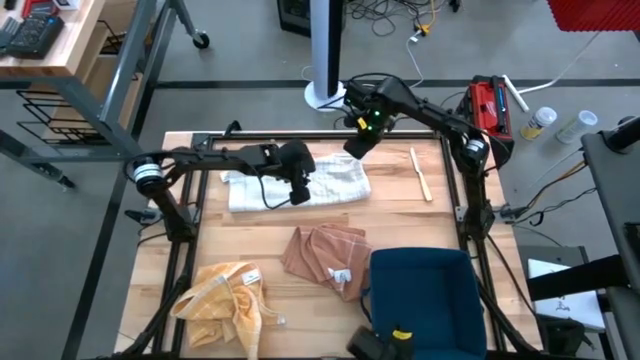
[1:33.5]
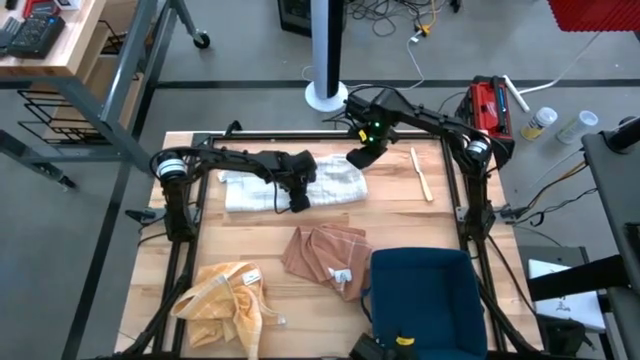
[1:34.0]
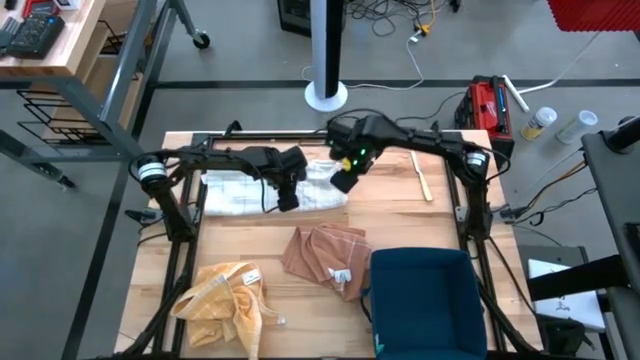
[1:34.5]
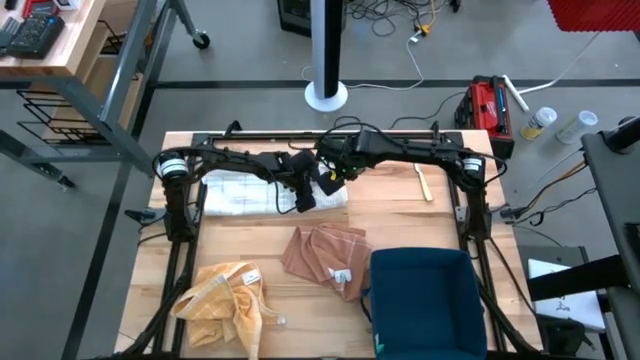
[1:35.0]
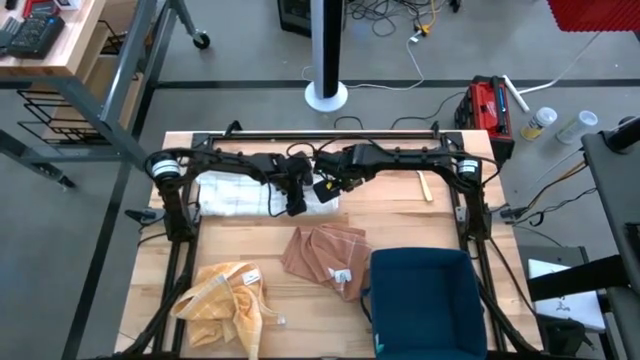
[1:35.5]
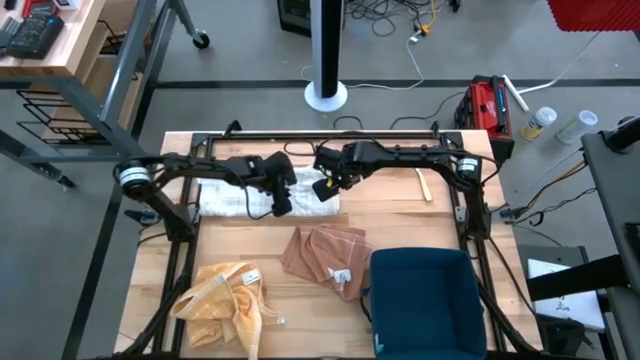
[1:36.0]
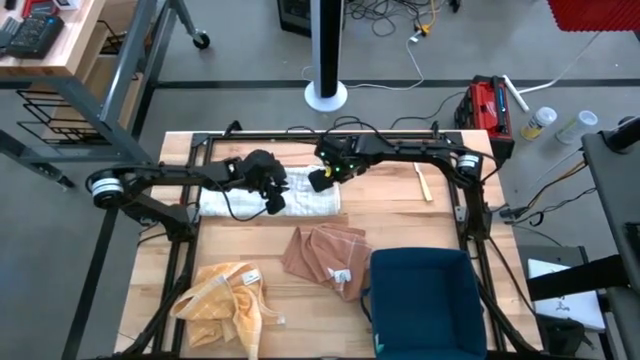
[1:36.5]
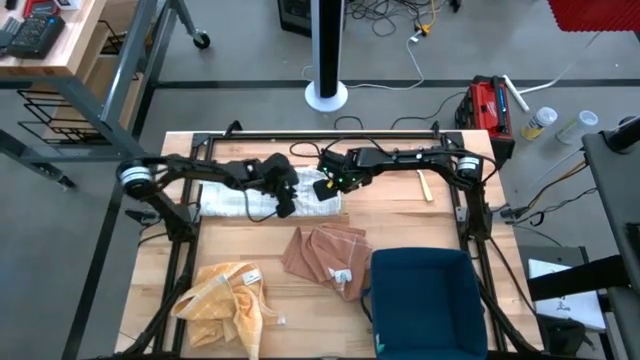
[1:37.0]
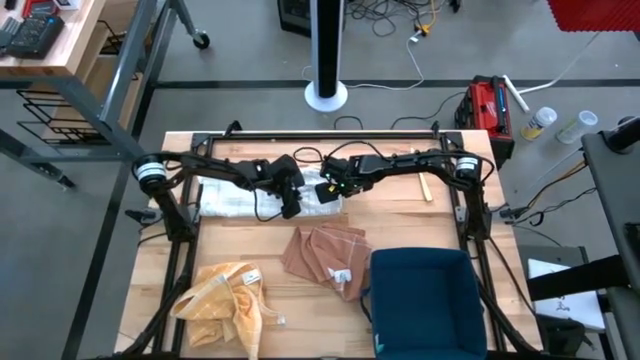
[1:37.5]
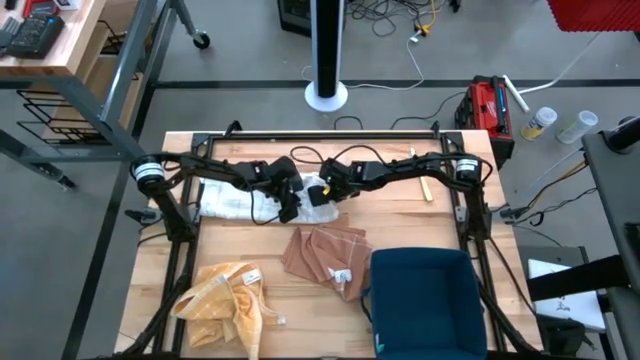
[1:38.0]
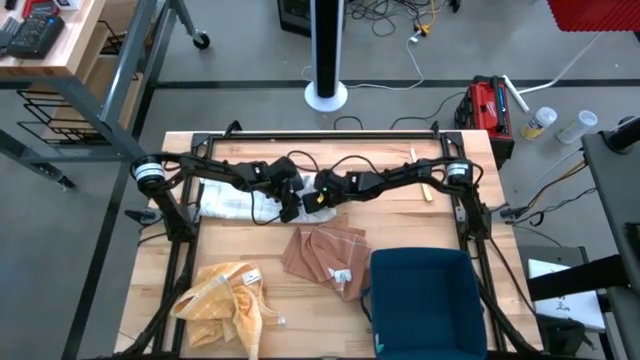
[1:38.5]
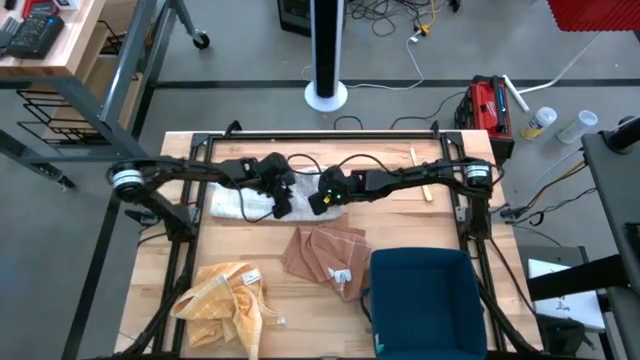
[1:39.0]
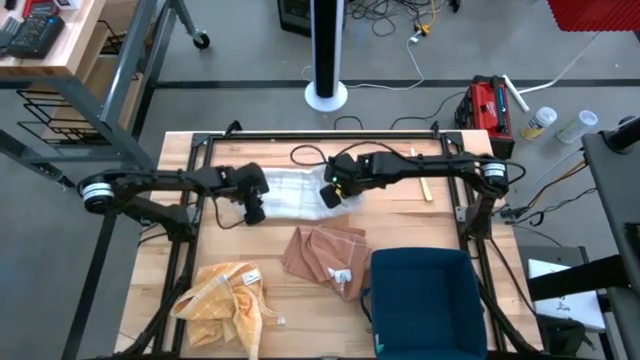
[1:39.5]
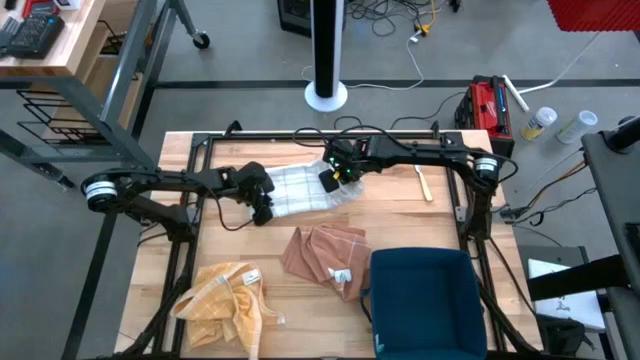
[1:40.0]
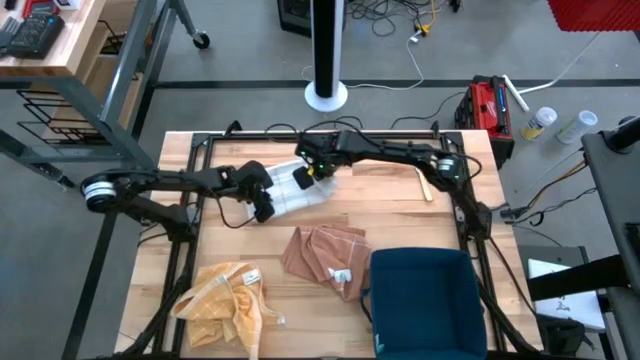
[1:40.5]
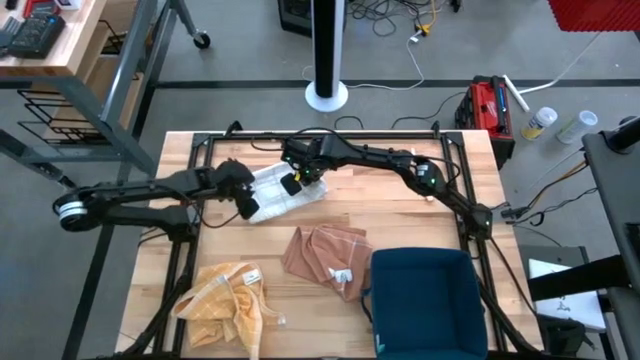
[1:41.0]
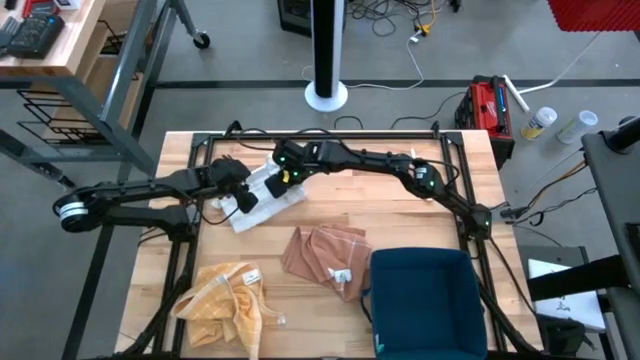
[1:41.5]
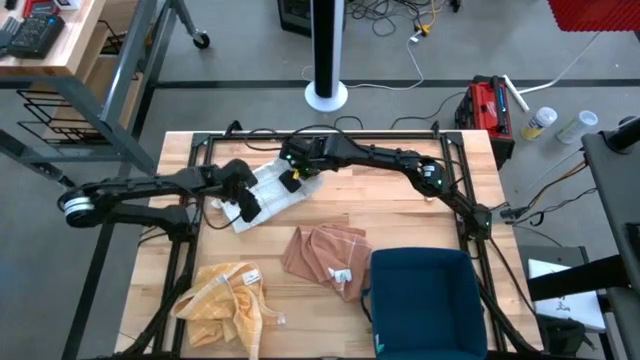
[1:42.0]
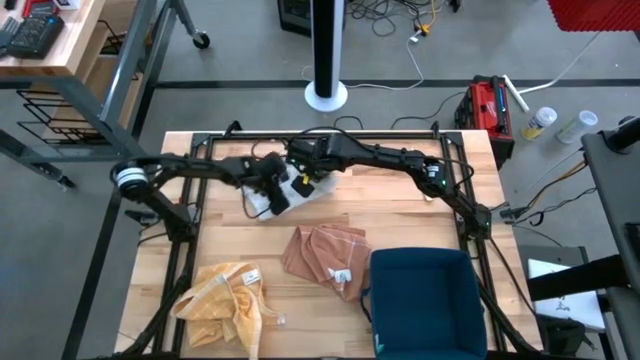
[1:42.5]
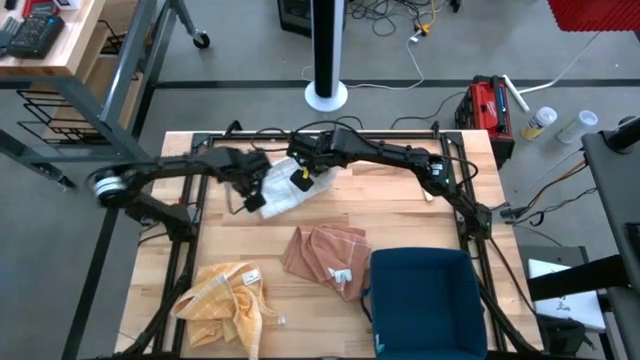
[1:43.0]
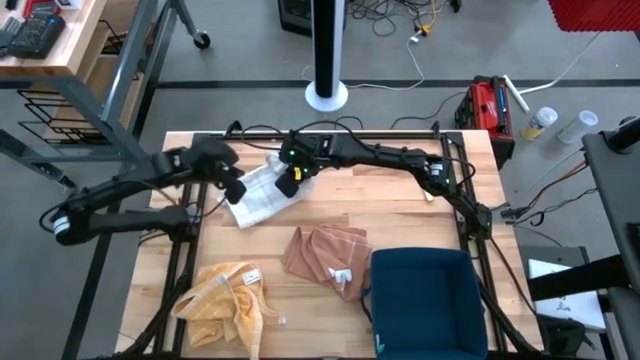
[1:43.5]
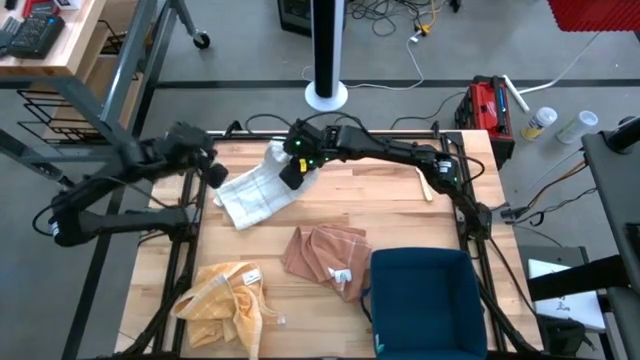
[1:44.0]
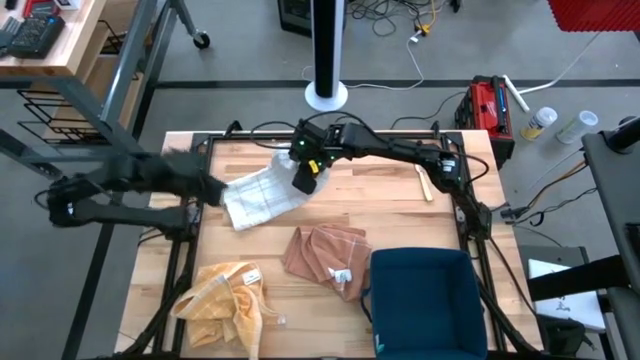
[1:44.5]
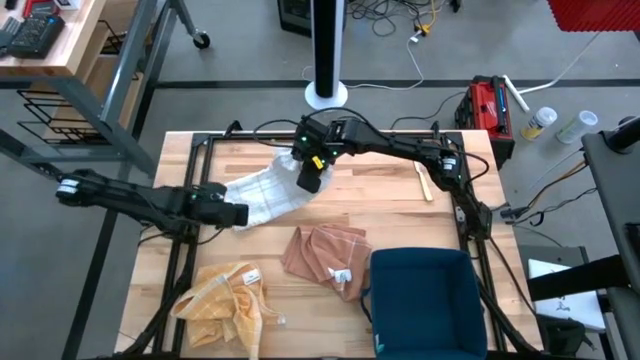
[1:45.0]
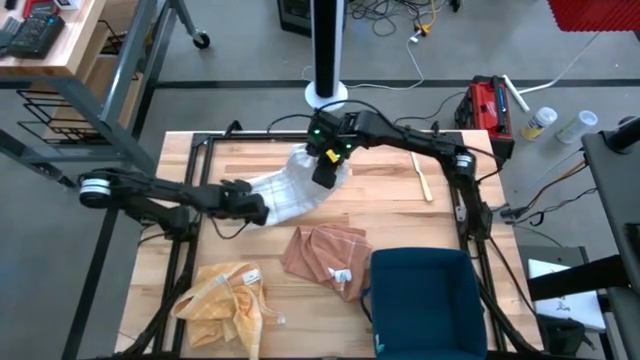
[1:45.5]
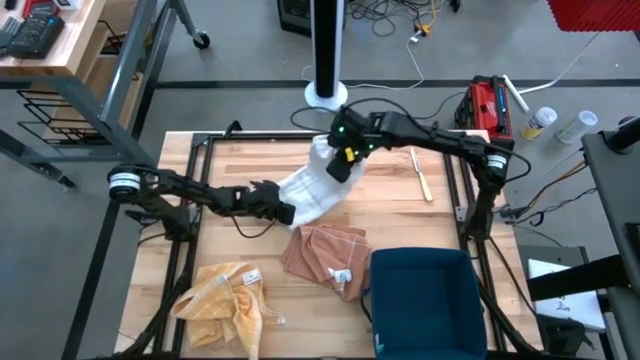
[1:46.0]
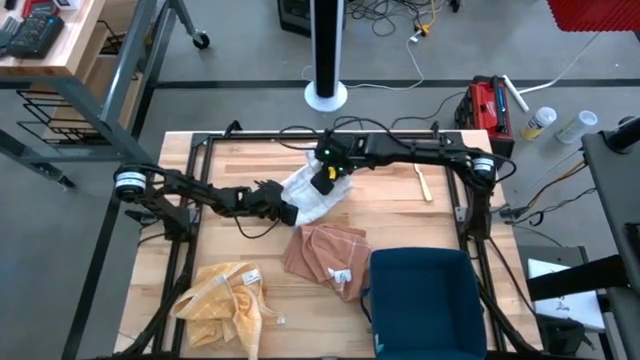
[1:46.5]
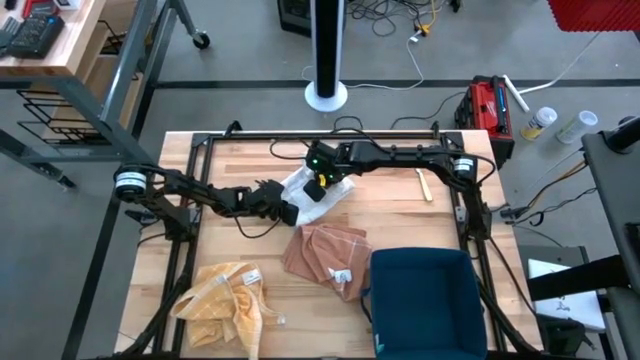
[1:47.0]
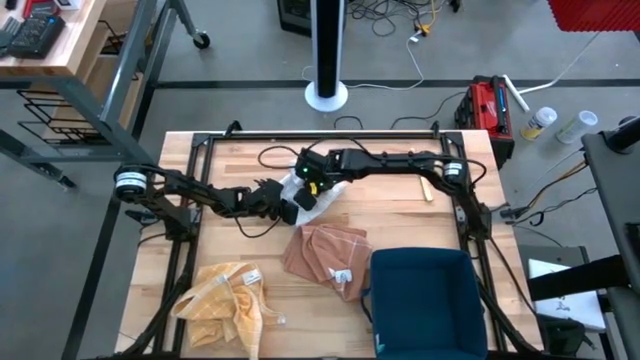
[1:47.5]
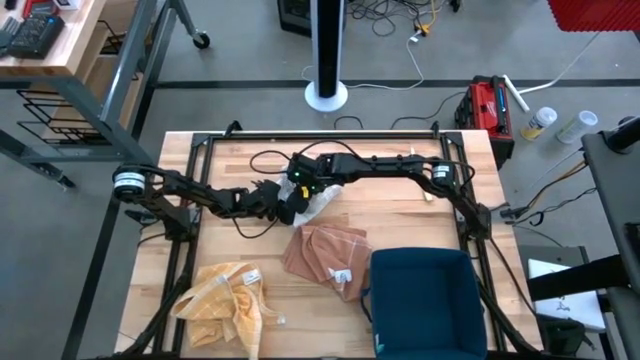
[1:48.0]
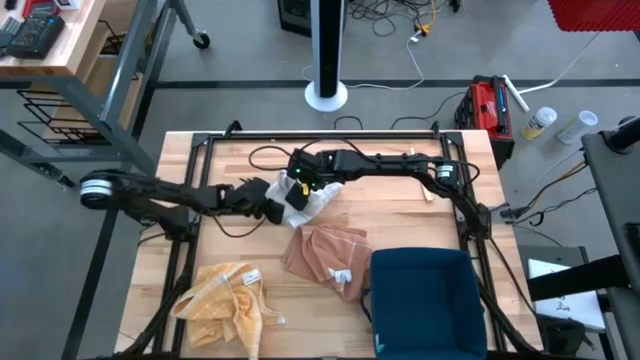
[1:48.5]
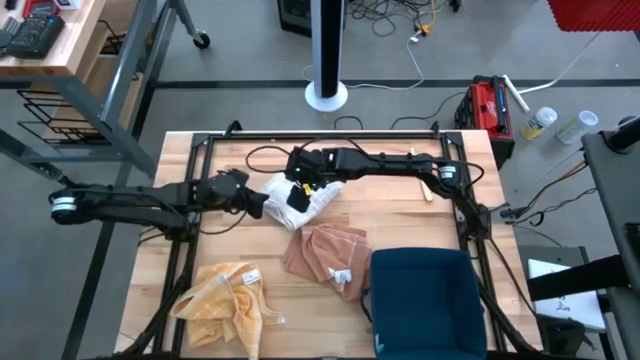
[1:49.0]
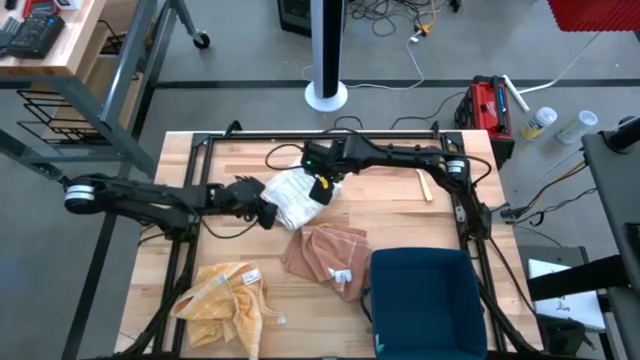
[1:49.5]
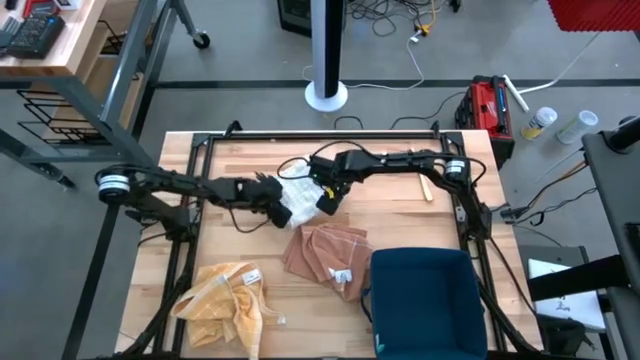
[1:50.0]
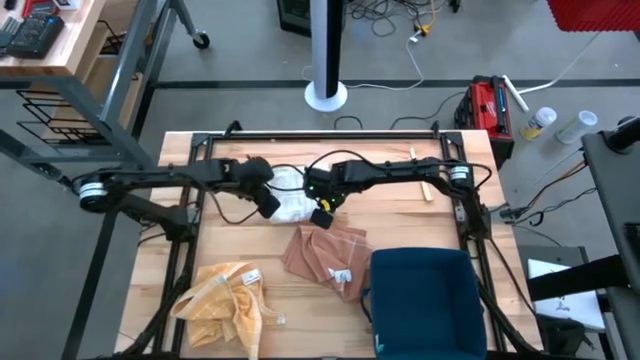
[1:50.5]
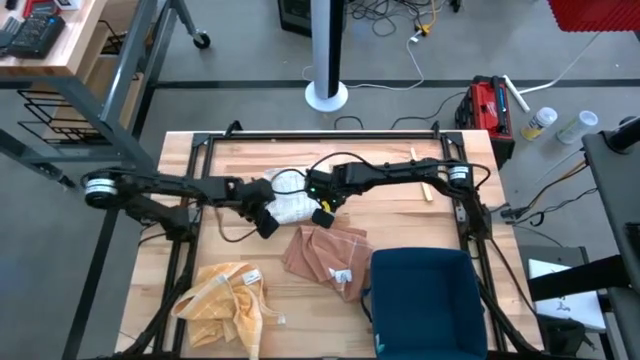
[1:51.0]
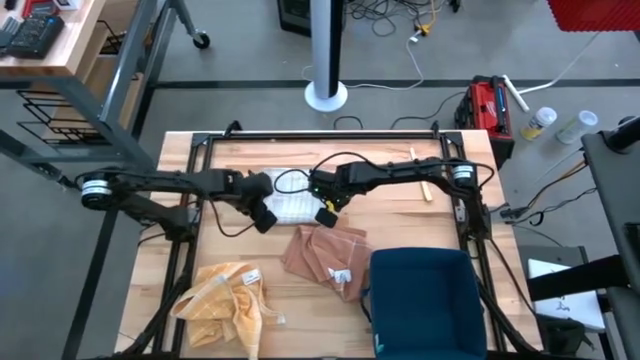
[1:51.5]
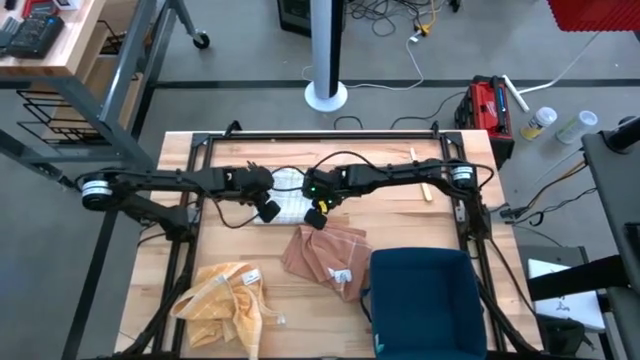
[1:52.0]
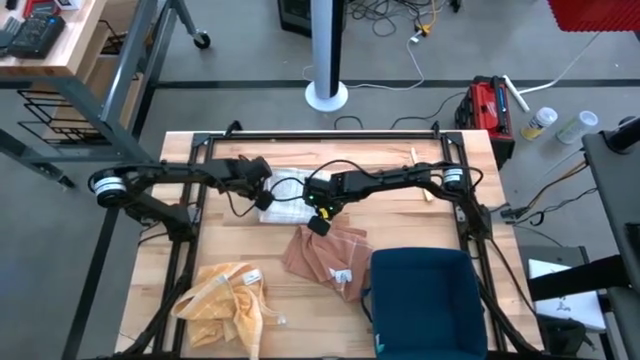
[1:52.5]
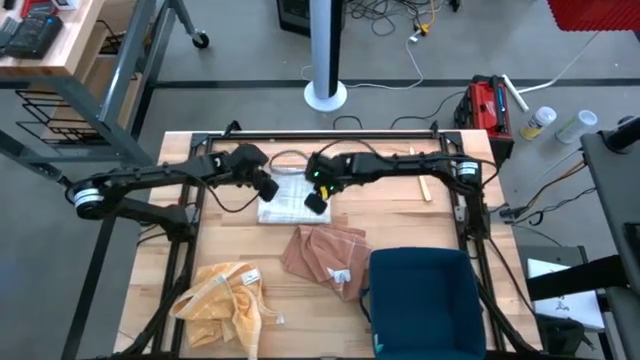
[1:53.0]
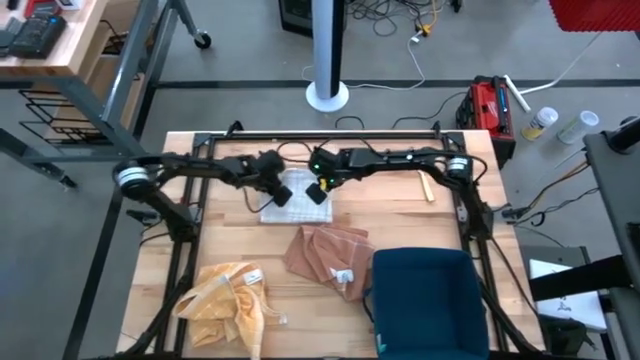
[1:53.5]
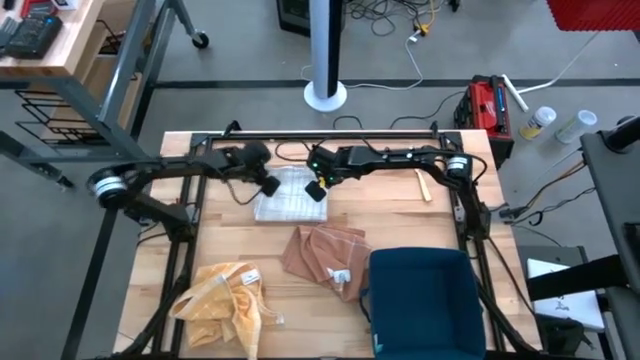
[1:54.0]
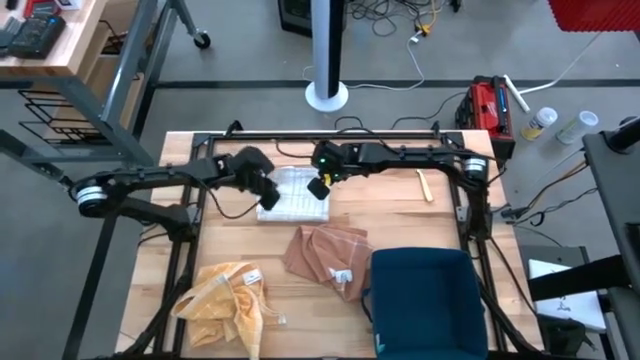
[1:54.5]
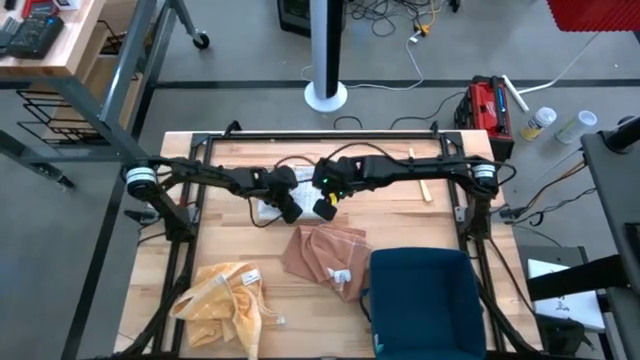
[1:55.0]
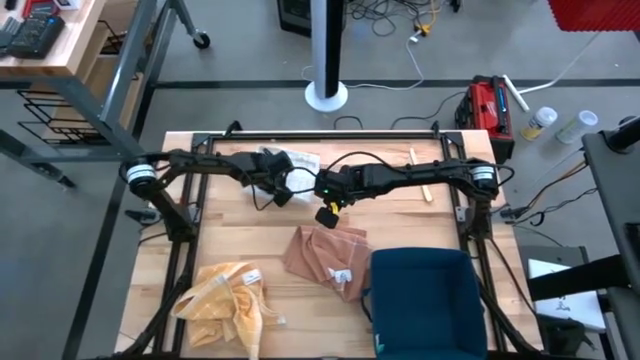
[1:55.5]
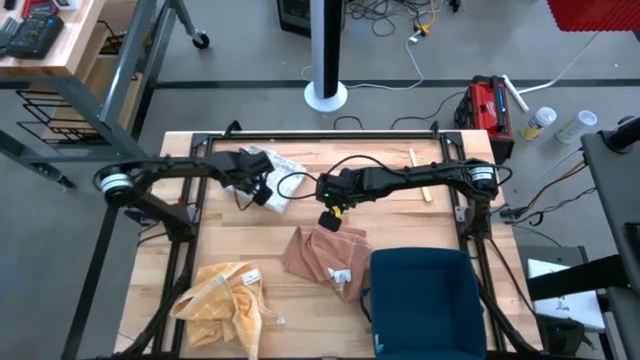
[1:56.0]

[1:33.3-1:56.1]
Task: Fold towel
Fold the white towel
